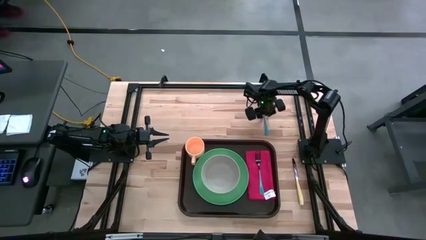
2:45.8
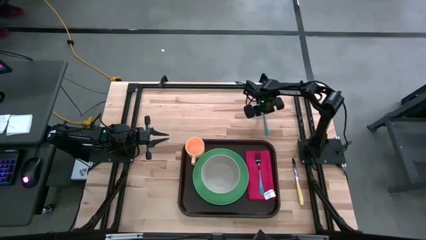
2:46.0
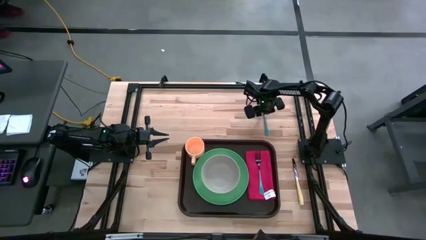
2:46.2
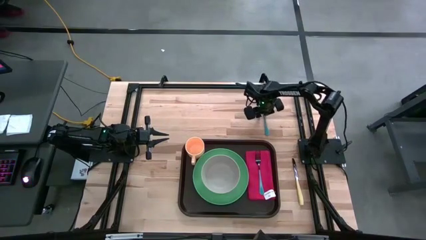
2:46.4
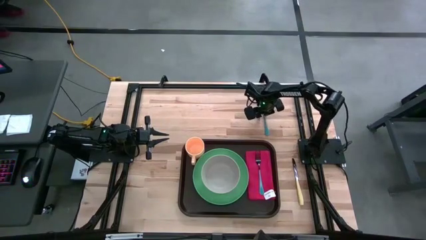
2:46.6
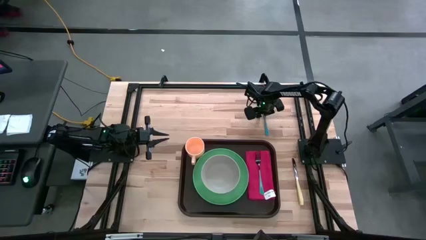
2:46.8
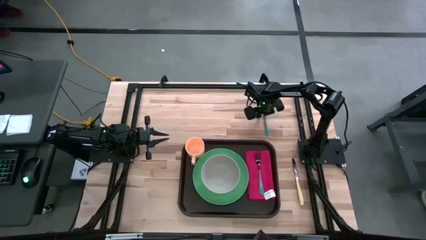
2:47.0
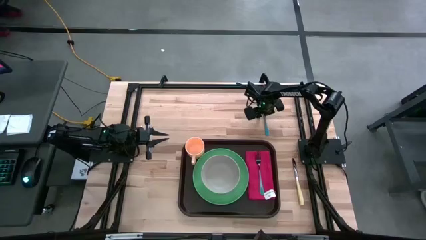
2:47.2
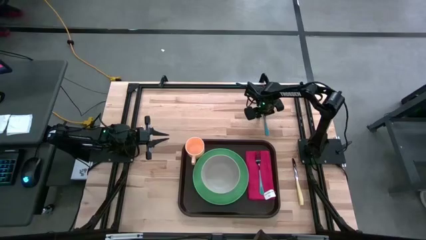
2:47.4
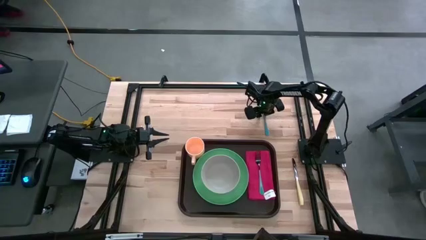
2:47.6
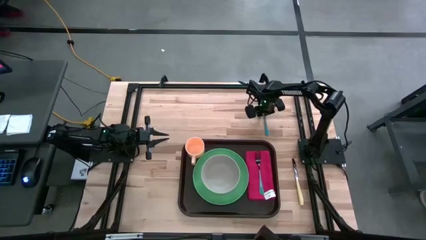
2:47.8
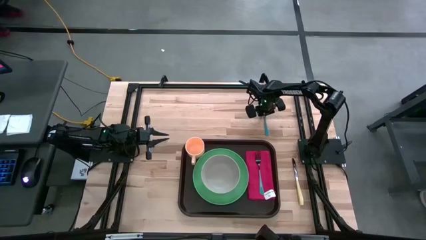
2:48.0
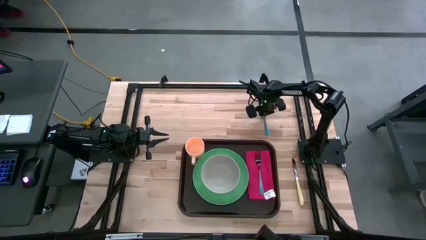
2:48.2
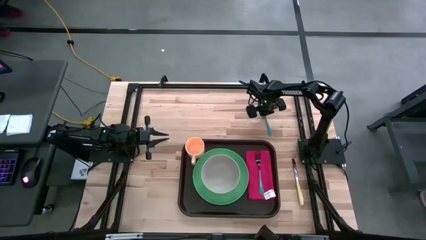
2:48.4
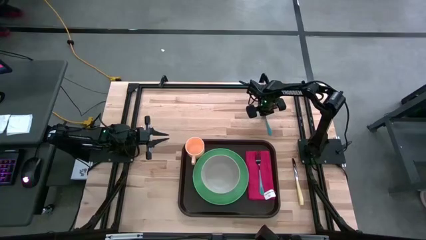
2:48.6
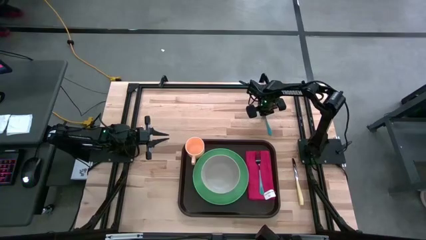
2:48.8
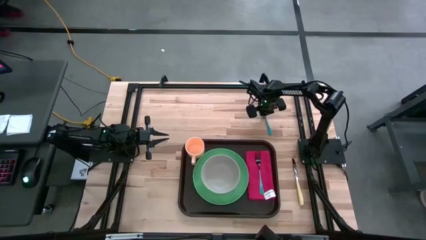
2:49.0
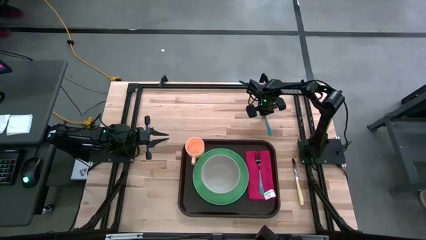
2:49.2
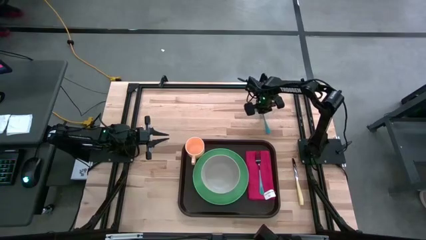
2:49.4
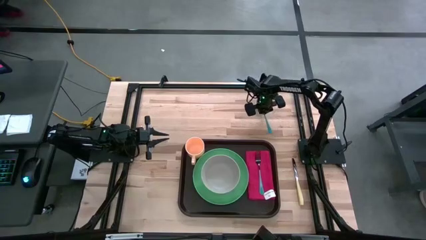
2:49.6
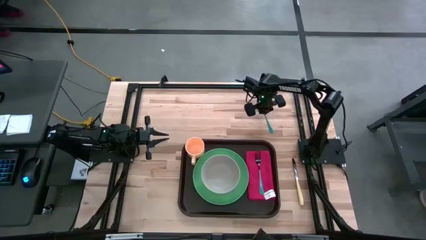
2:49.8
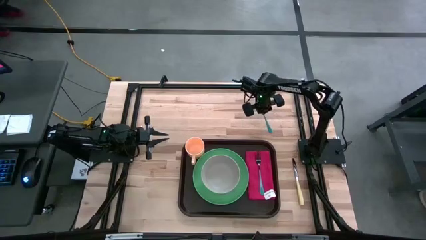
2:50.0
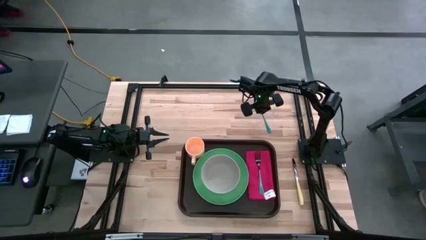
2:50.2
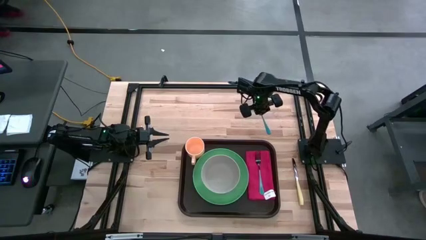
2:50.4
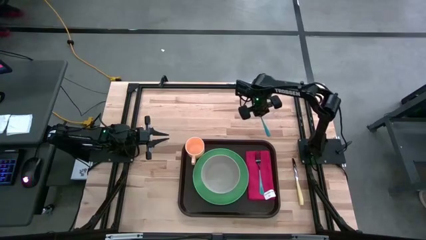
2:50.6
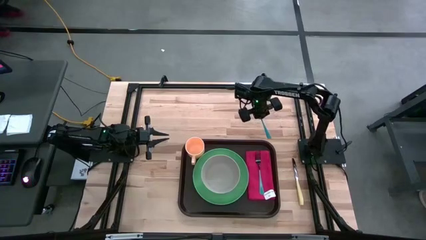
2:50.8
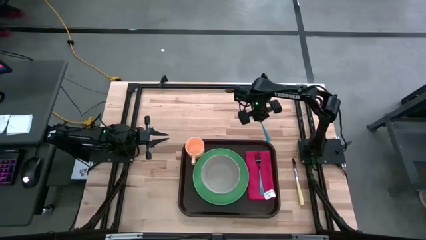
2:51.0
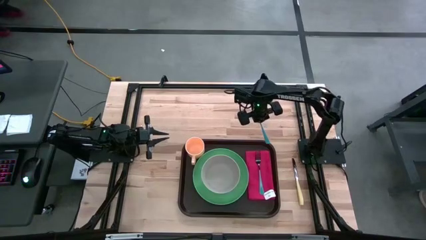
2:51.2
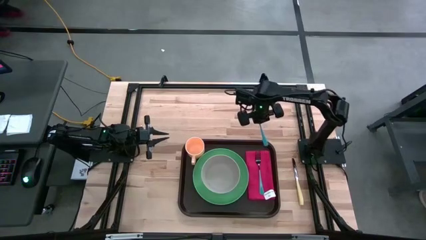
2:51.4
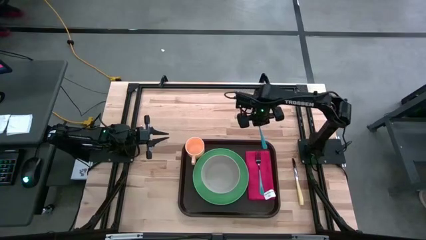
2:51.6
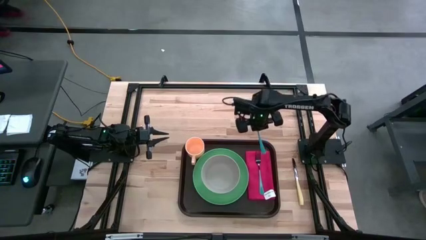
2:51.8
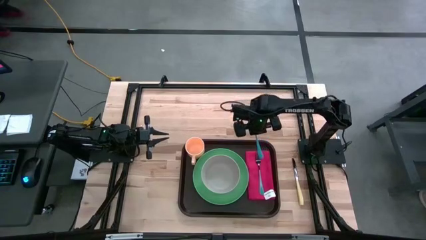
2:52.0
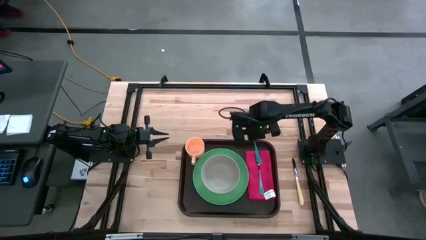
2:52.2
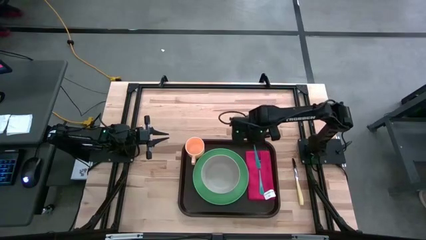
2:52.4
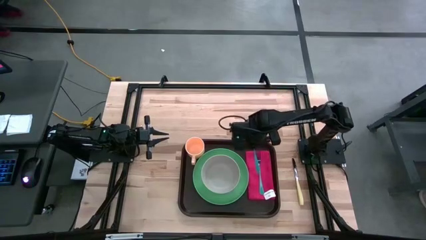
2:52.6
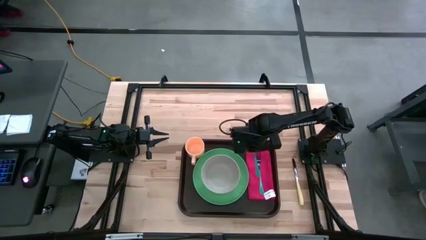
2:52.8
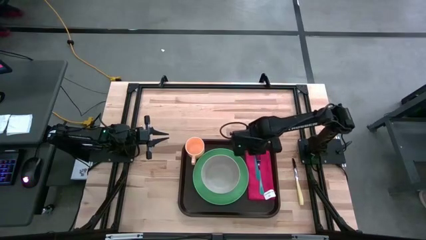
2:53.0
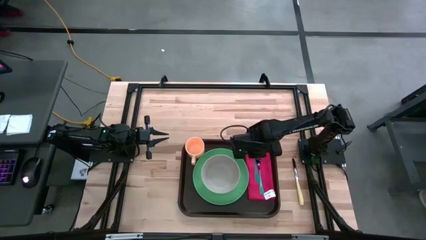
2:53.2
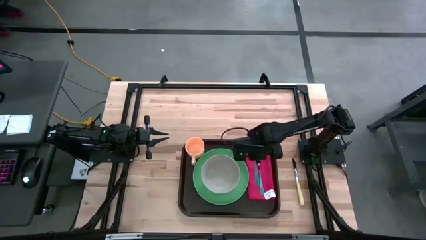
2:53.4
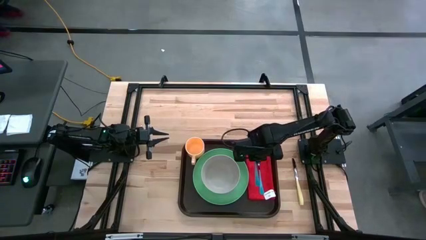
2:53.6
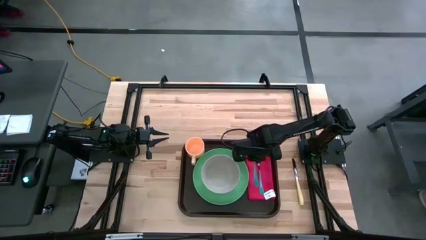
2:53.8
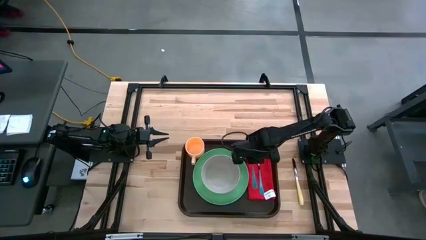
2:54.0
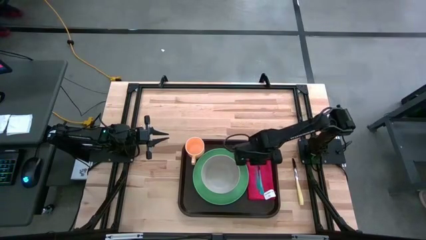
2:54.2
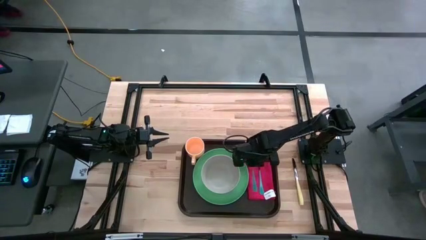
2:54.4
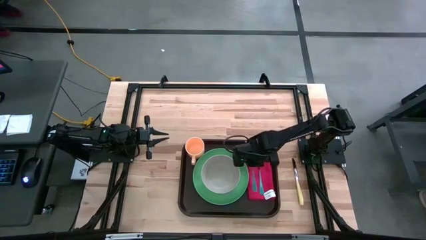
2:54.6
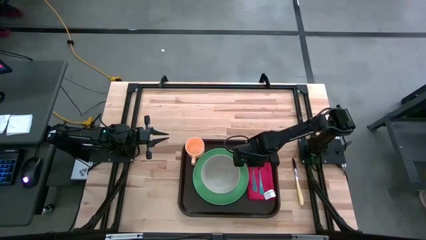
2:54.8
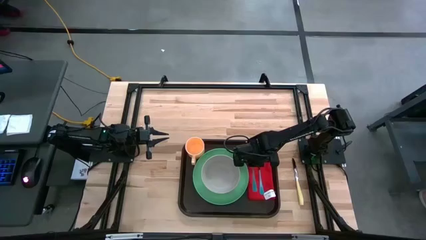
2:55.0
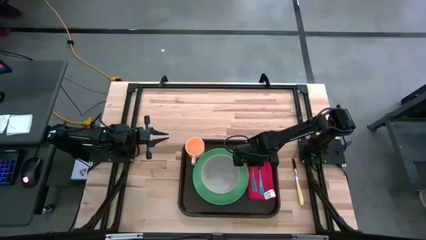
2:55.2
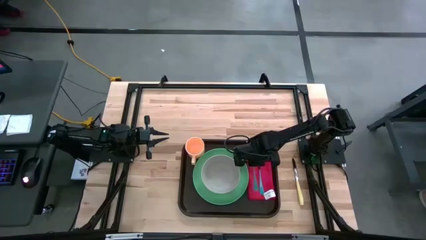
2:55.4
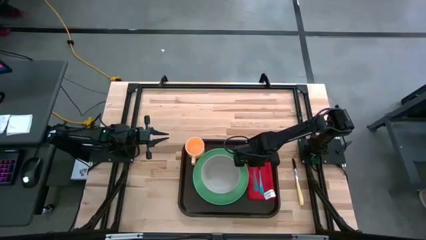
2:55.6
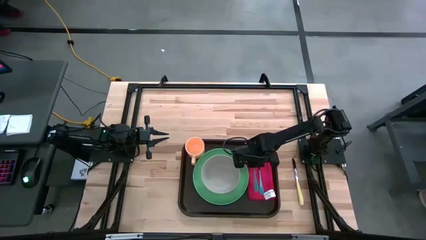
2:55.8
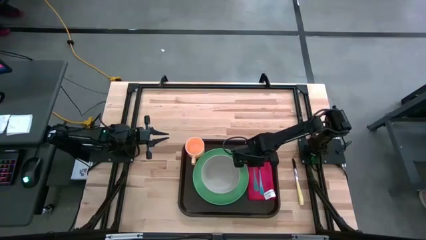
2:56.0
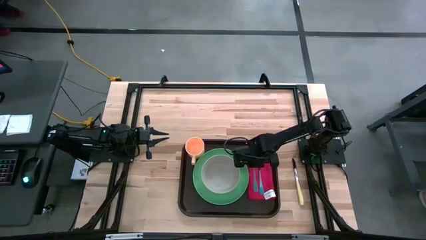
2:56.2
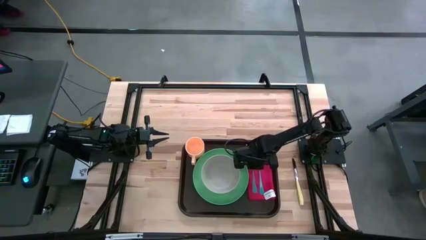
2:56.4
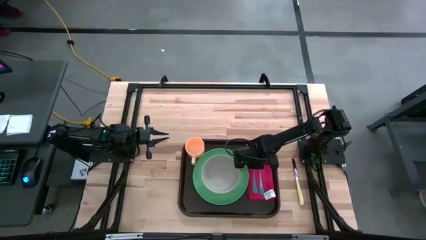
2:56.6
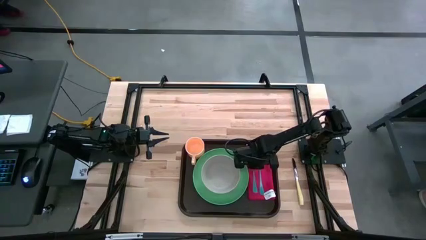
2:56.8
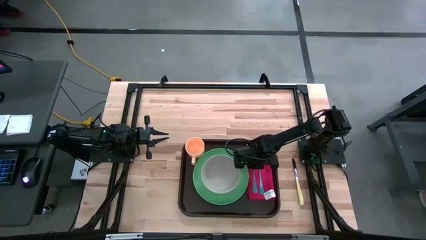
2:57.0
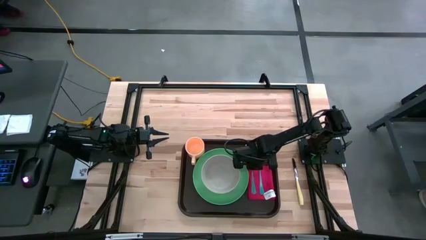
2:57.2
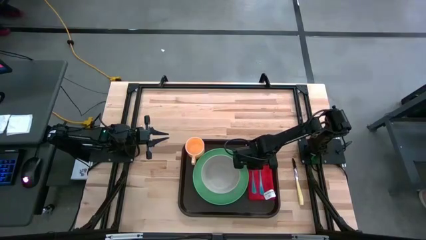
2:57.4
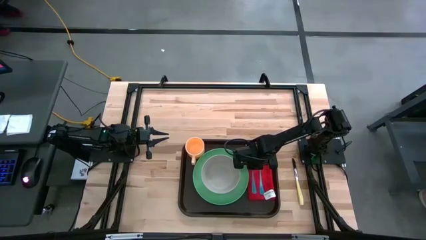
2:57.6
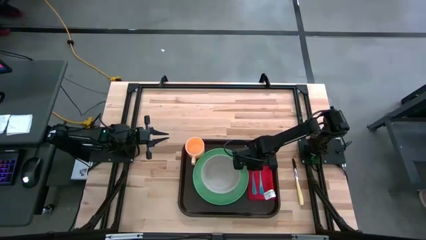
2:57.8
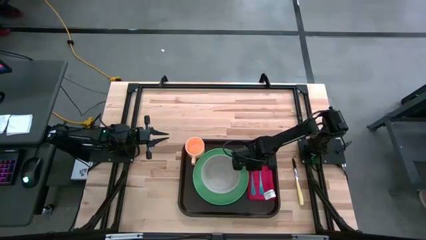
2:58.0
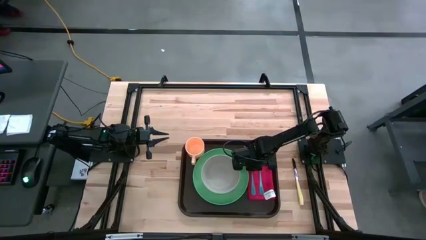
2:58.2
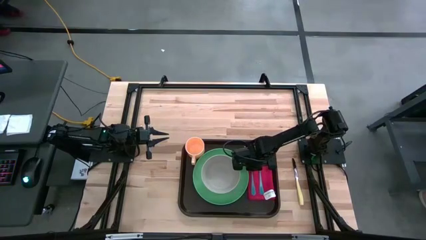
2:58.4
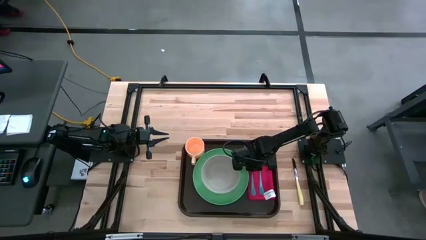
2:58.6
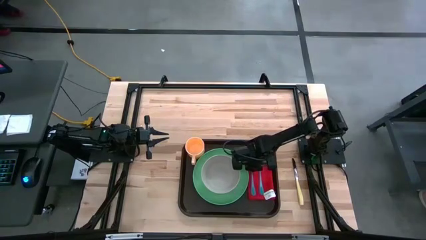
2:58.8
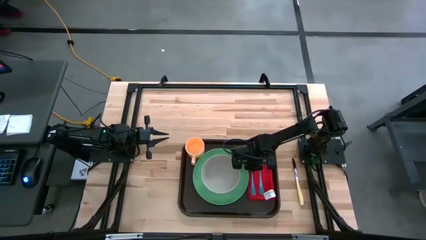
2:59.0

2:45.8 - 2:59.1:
Task: Set up tray
Put the blue spoon on top of the red table napkin

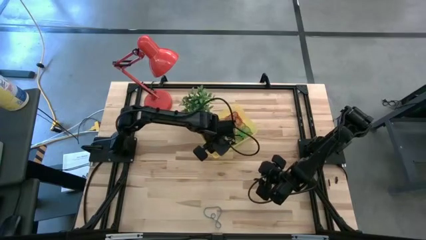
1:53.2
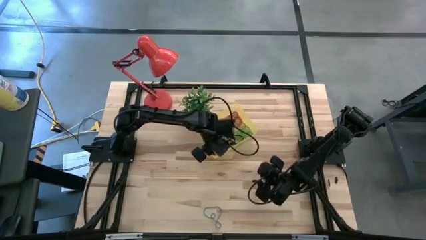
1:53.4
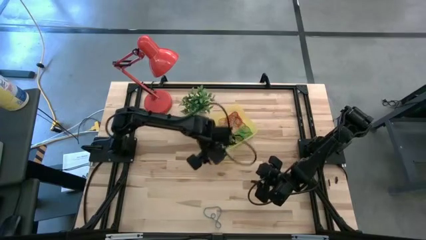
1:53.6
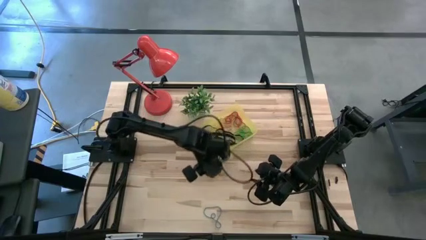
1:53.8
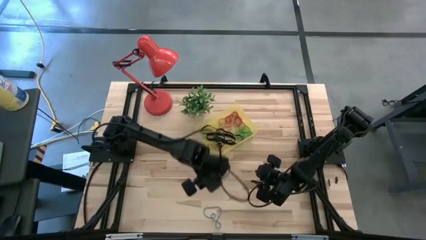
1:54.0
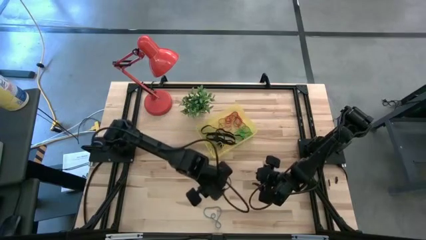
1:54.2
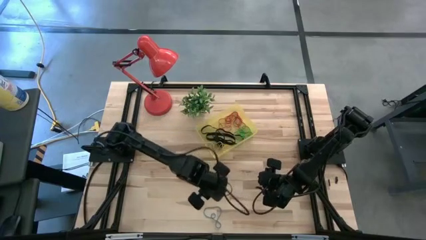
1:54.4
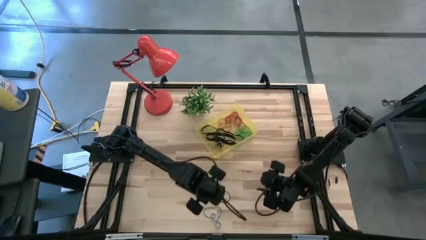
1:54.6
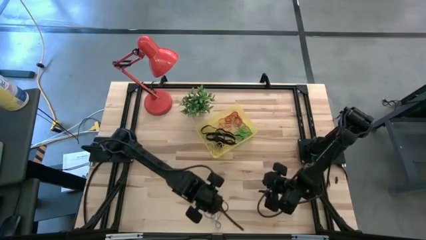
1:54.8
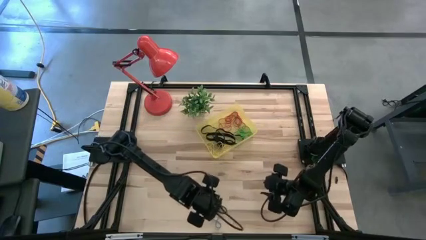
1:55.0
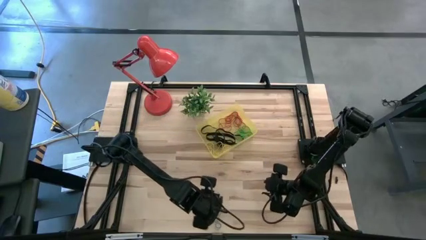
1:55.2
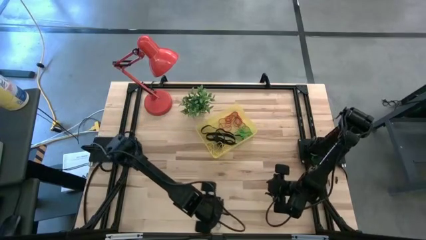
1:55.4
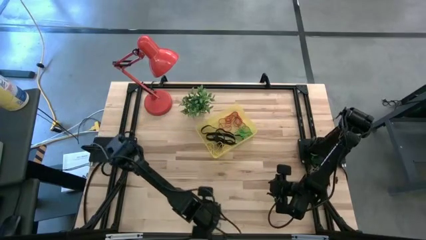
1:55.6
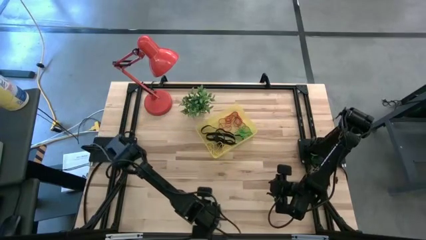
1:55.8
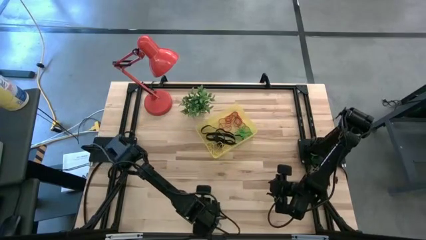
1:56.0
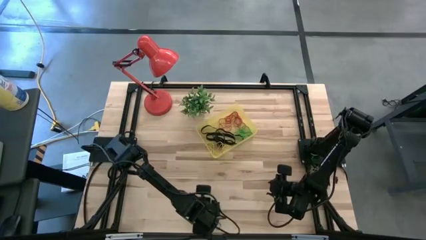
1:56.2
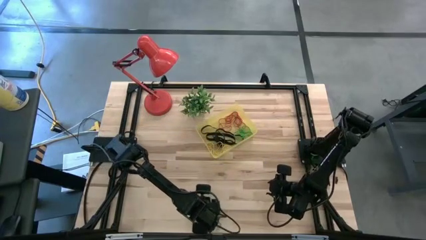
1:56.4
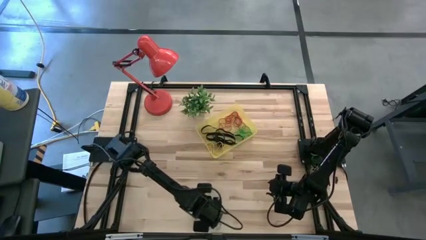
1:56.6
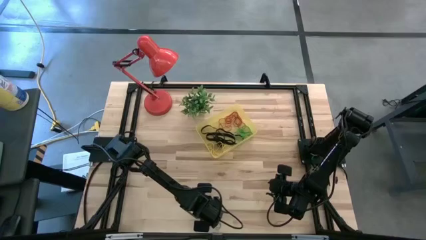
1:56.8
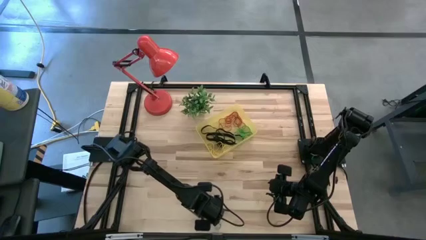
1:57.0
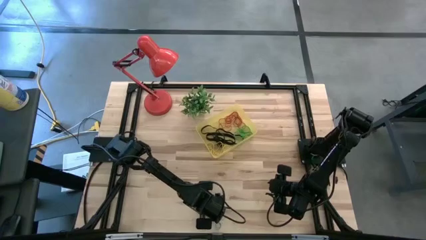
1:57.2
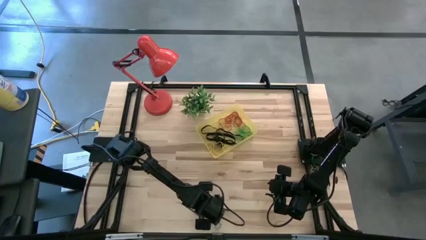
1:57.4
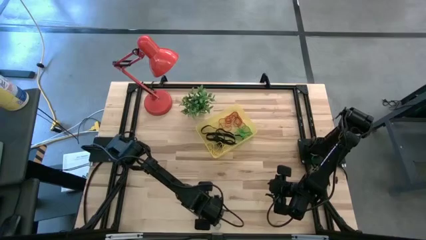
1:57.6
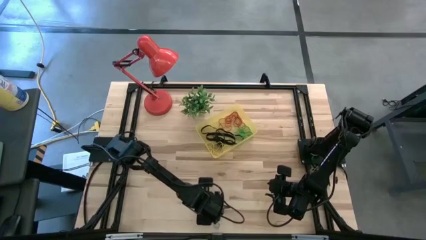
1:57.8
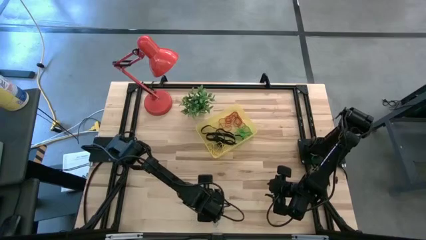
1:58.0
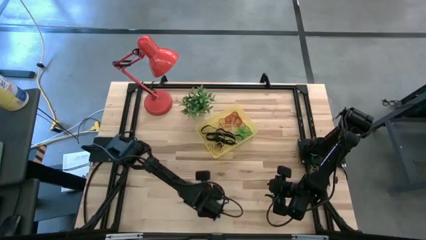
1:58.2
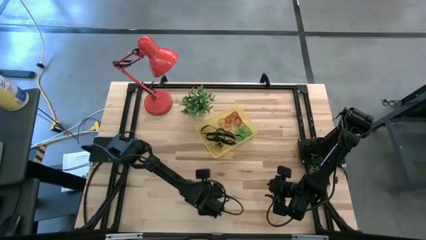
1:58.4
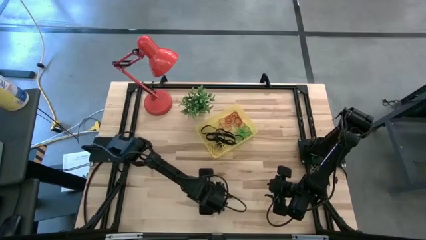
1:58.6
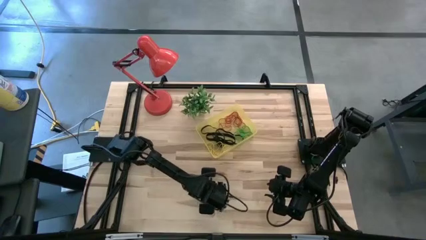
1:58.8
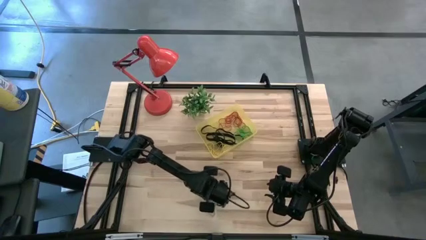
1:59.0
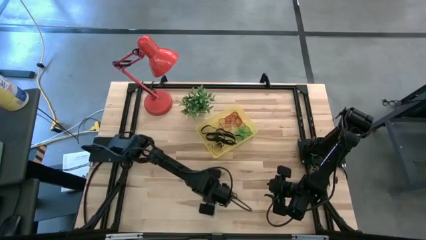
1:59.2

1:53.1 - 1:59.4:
Task: Pick and place rubber bands into bin
Put the blue rubber band into the transparent yellow bin
